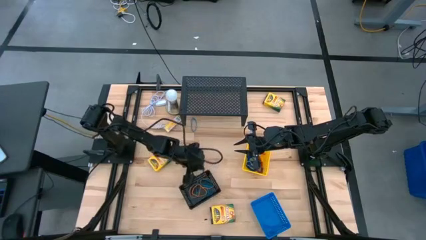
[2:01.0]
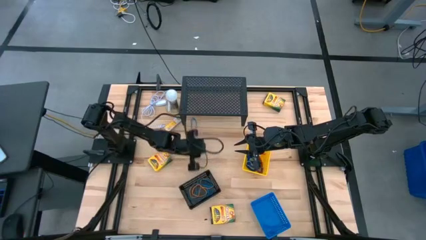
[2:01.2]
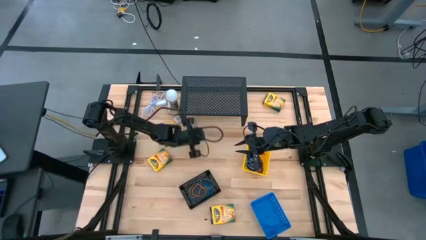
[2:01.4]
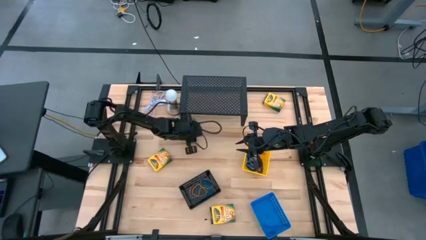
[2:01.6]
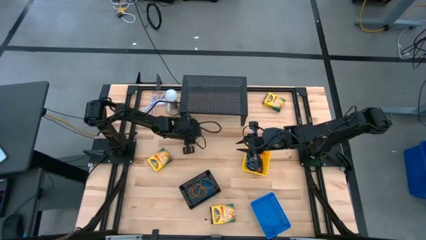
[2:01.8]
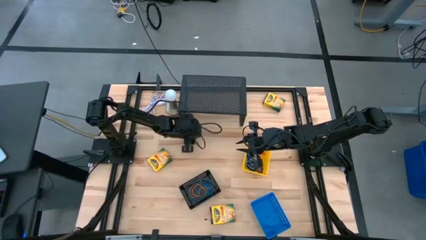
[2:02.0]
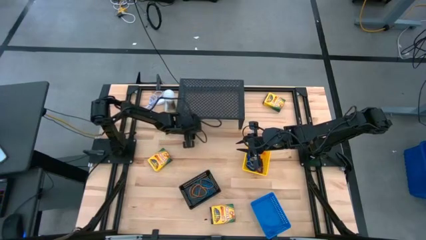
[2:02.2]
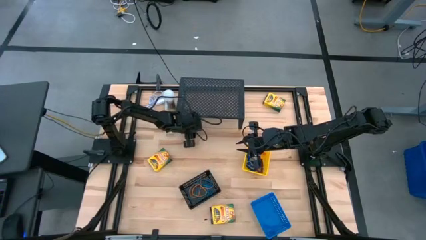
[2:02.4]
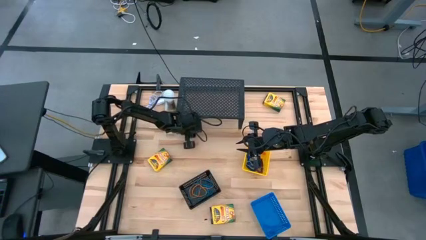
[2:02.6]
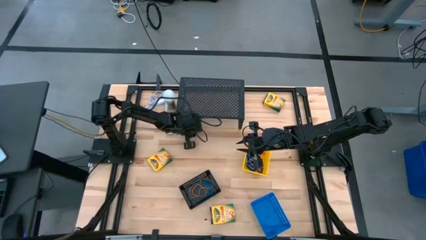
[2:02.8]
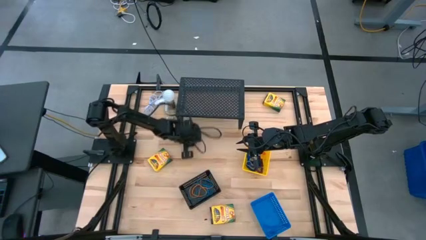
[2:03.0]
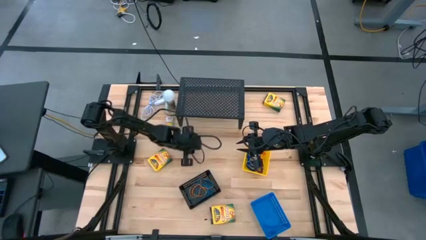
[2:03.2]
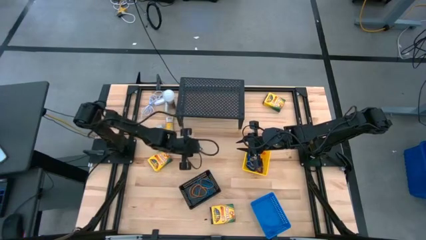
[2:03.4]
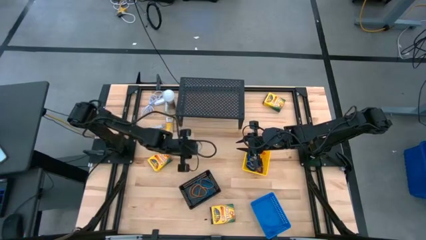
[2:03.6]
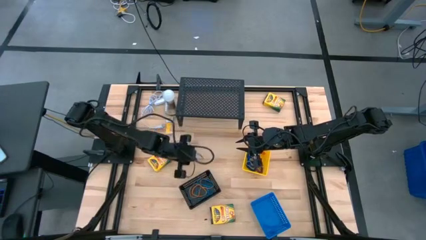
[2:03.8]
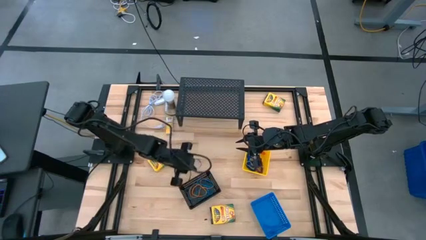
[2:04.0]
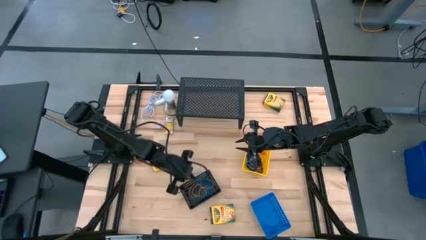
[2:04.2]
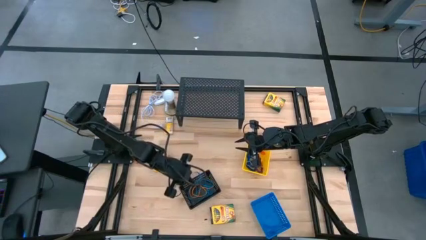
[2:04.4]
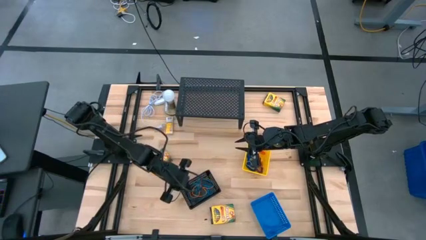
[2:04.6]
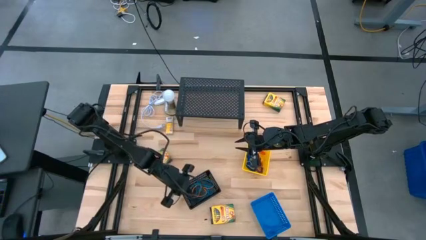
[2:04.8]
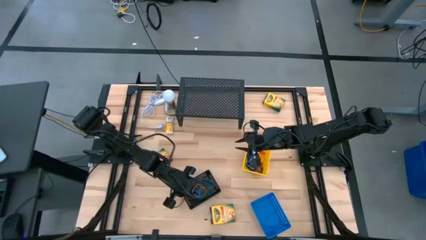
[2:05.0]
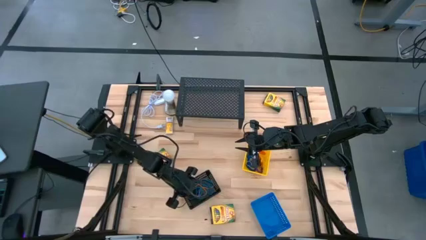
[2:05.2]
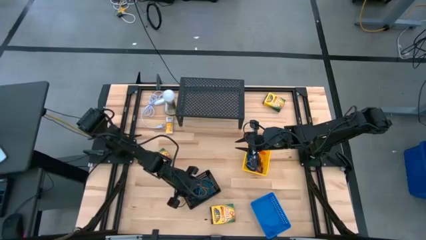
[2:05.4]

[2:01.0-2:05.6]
Task: Pick & Place Office Desk Supplies
Put the blue rubber band into the black basket

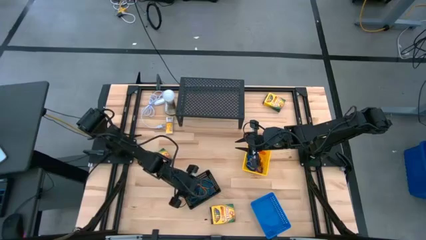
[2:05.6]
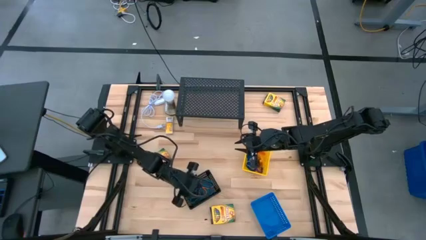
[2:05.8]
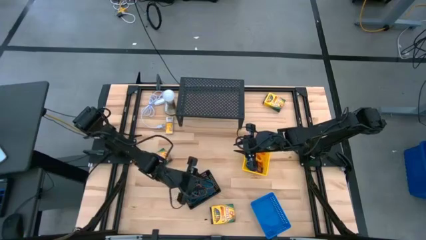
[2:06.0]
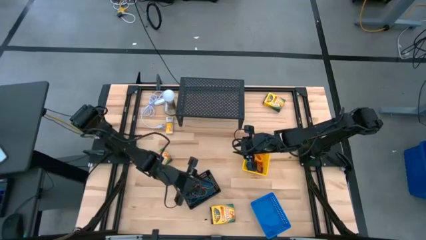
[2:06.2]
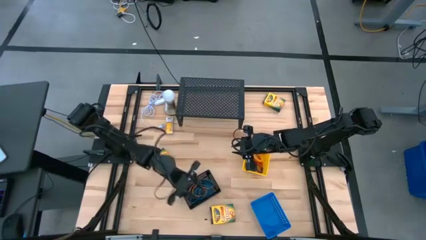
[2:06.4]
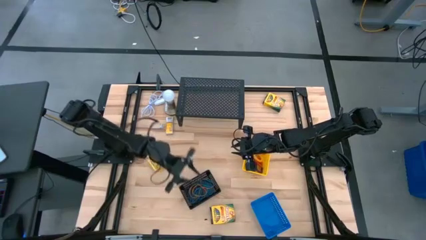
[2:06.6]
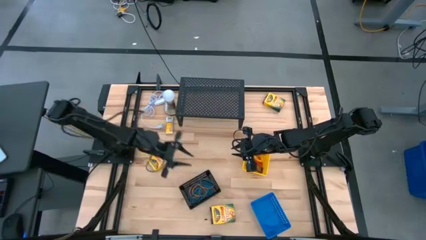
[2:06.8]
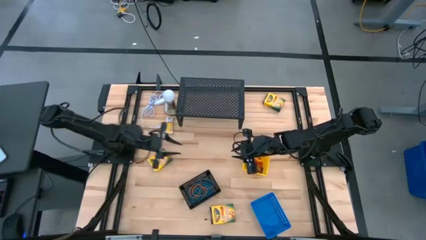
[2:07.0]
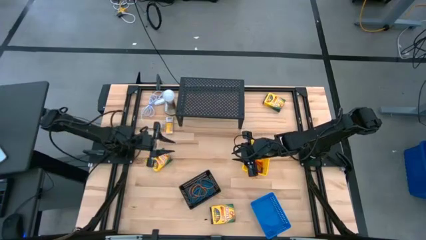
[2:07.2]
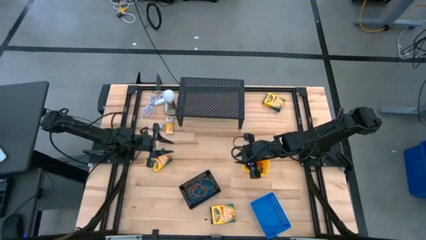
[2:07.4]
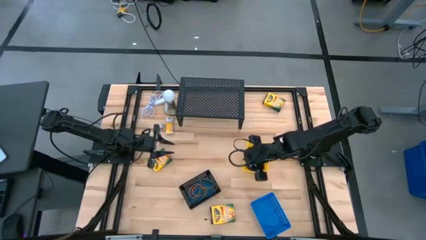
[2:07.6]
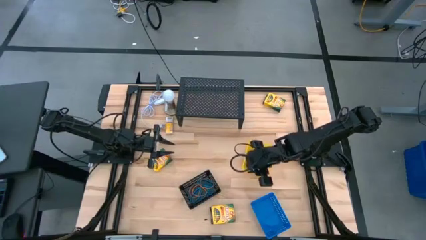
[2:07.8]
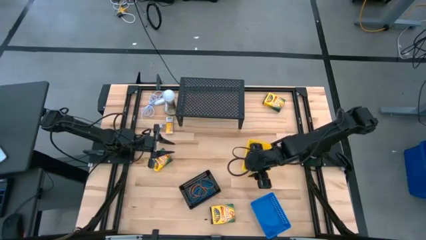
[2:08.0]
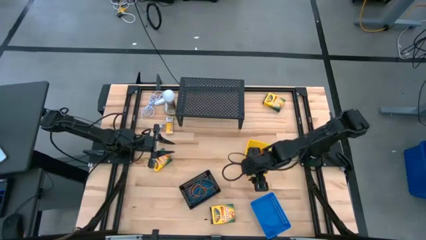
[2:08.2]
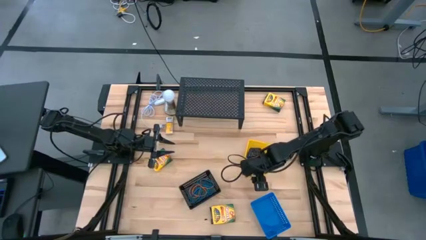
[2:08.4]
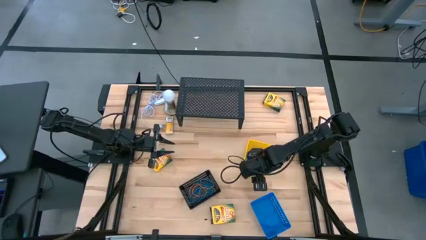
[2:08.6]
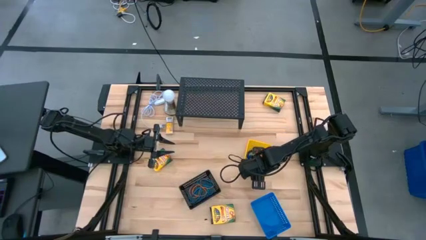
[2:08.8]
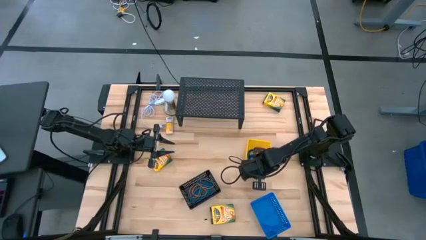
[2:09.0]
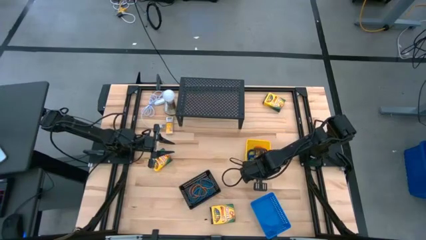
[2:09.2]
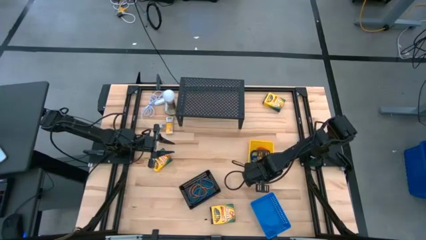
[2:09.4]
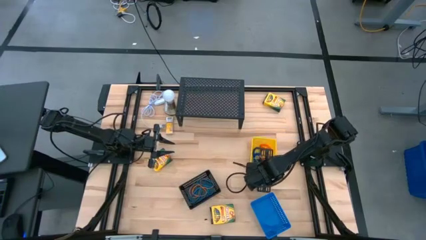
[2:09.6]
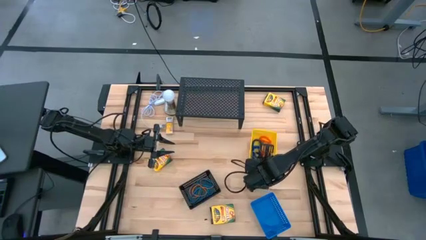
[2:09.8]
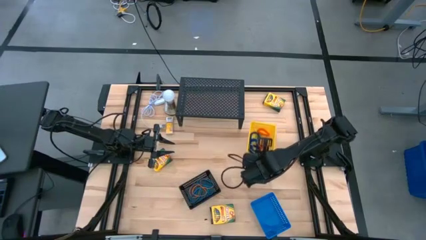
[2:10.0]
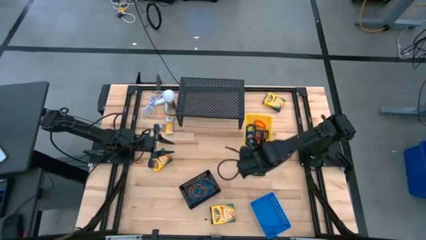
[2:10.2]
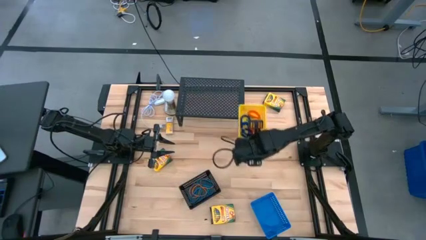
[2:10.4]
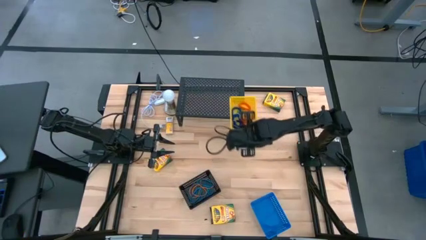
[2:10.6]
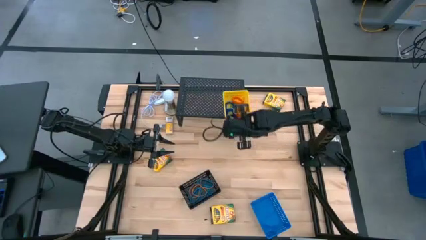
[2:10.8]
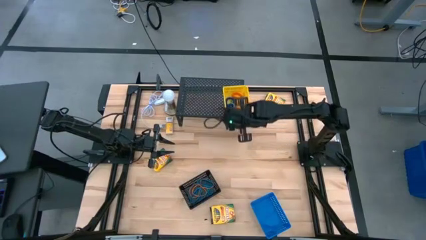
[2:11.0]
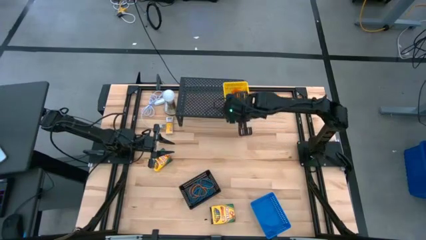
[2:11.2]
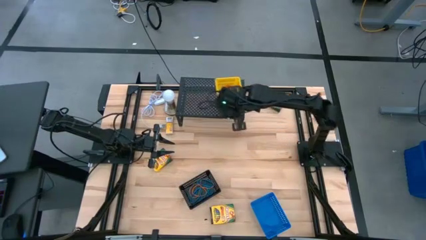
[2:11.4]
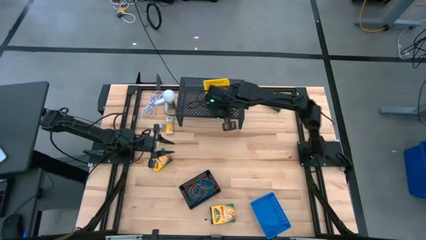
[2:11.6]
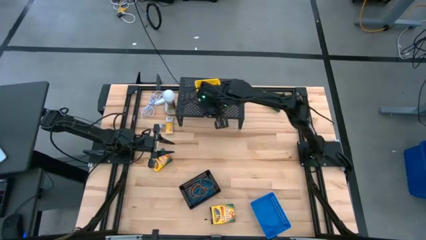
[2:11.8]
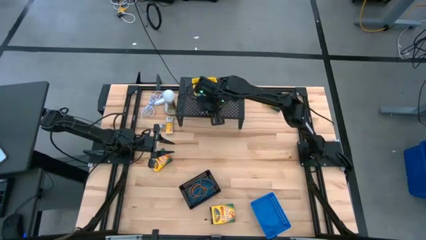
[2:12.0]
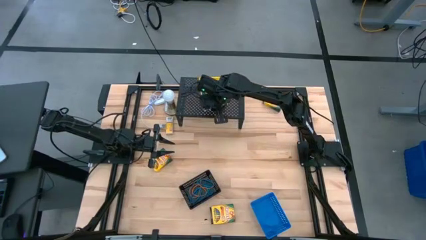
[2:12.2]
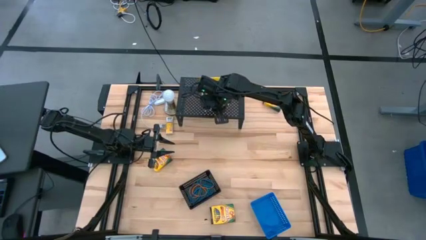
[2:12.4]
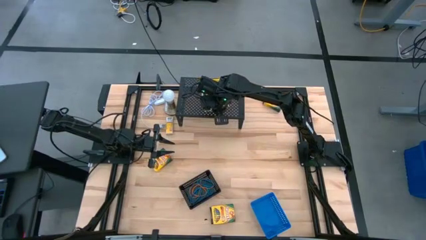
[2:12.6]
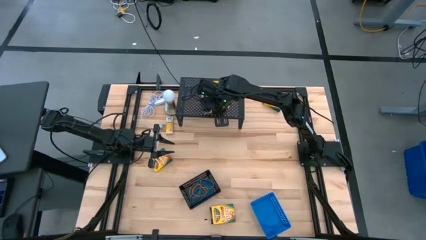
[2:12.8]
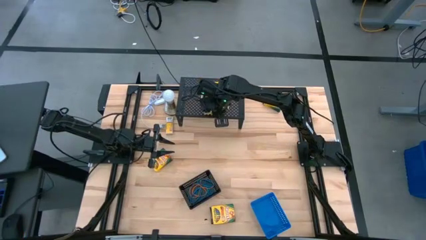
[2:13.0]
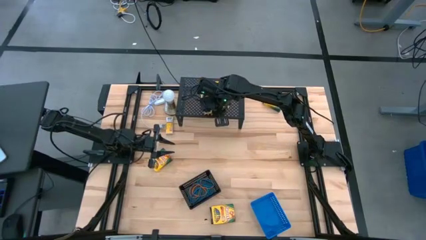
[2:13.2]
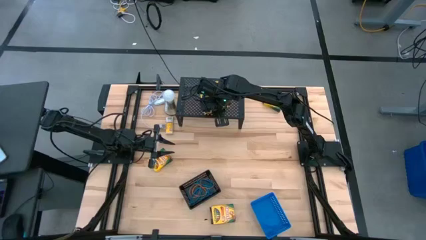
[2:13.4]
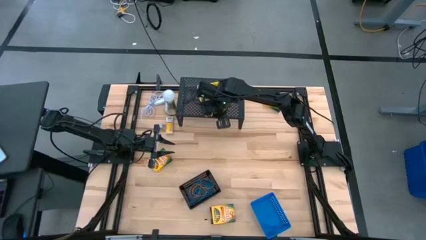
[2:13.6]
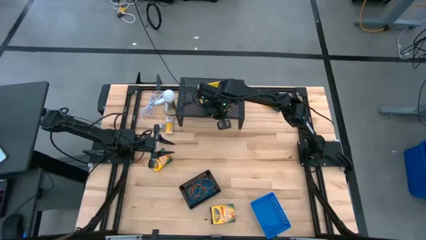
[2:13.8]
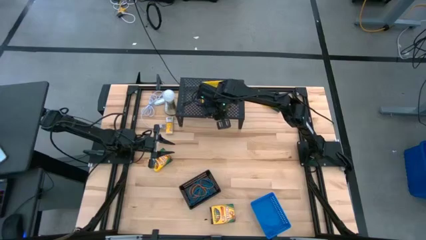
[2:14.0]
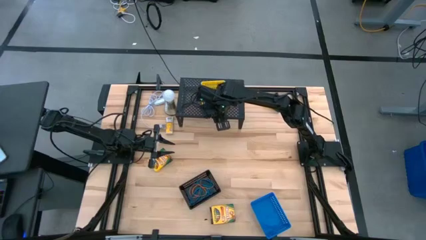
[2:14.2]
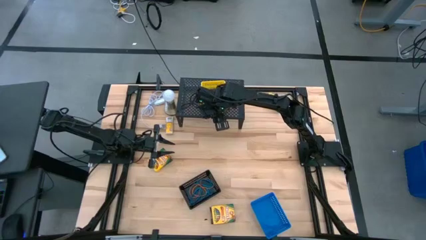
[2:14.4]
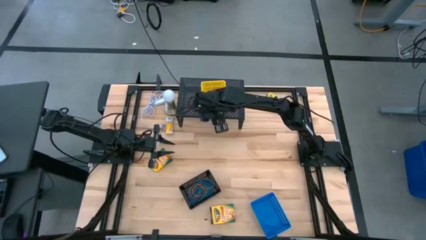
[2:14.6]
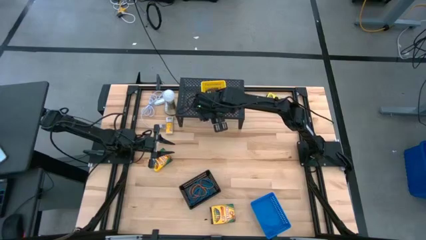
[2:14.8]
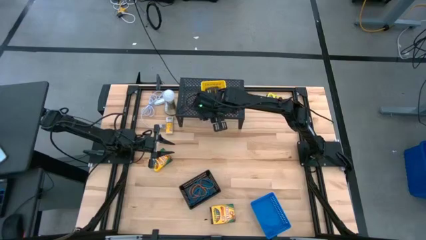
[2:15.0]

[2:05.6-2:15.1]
Put the yellow basket on the shelf
